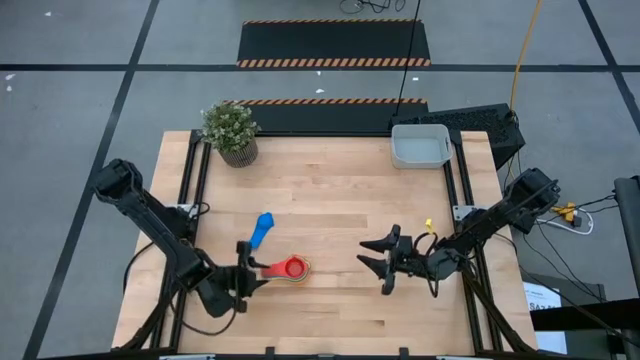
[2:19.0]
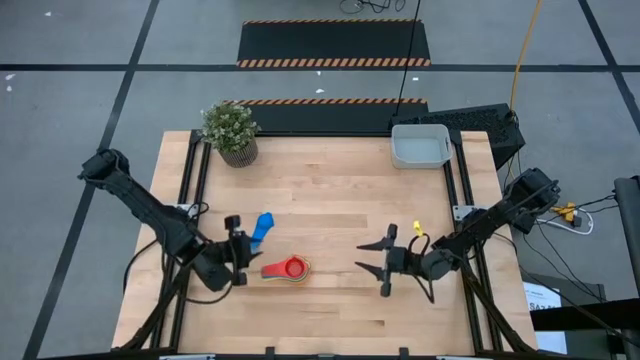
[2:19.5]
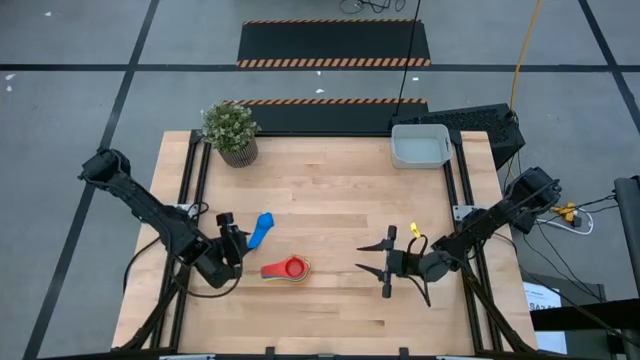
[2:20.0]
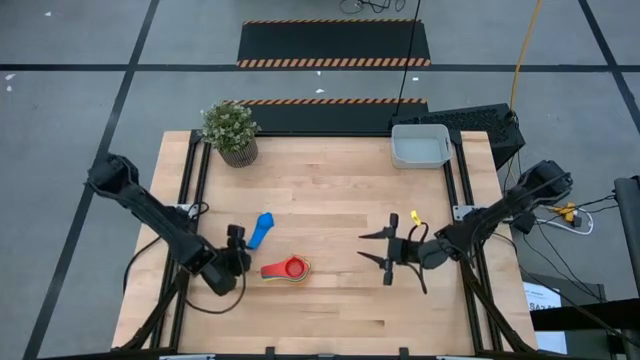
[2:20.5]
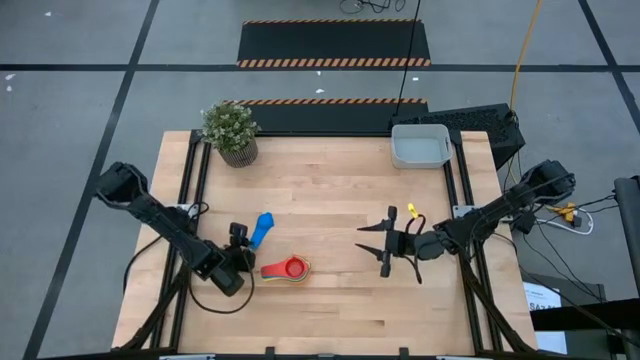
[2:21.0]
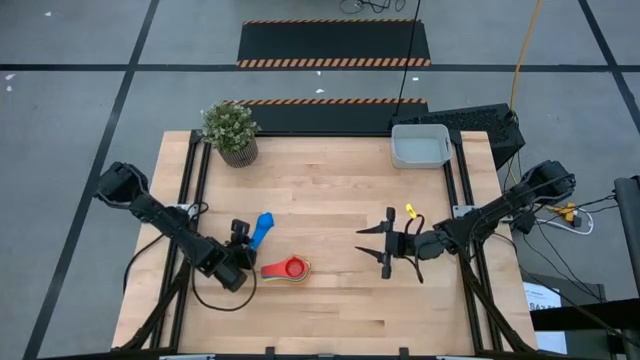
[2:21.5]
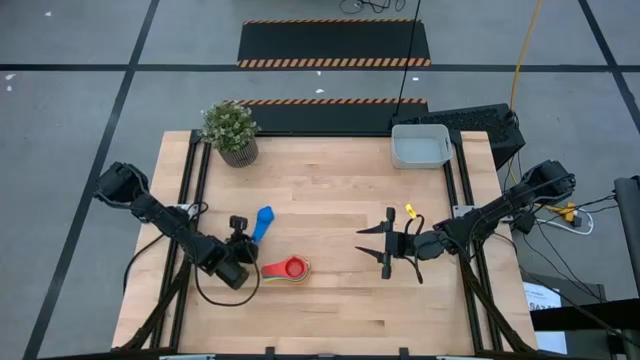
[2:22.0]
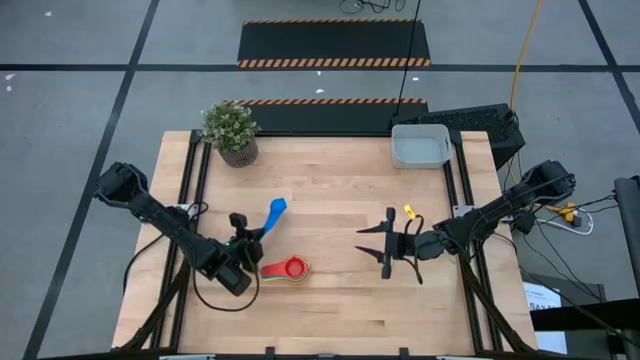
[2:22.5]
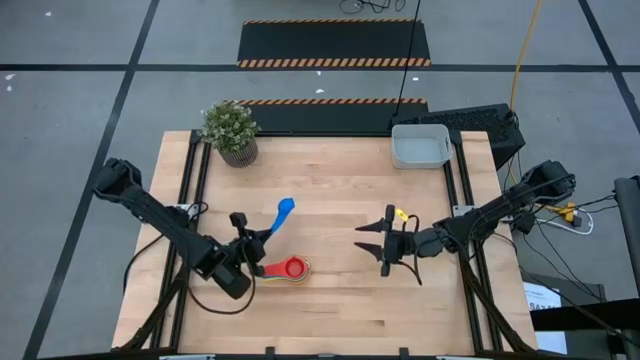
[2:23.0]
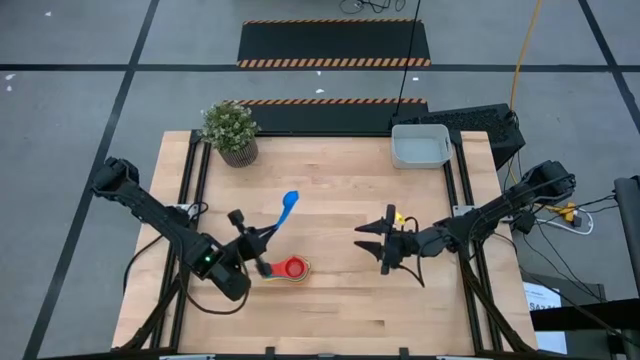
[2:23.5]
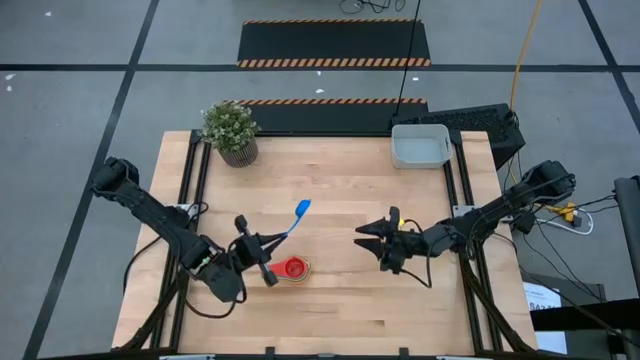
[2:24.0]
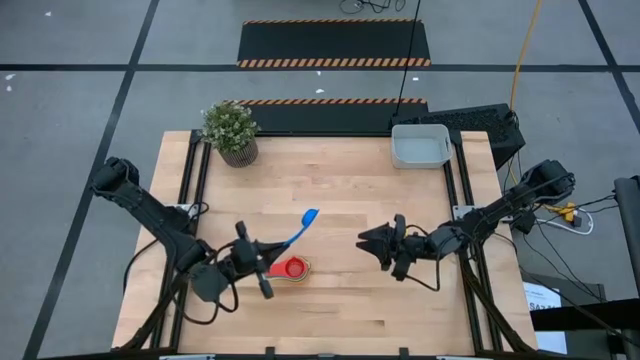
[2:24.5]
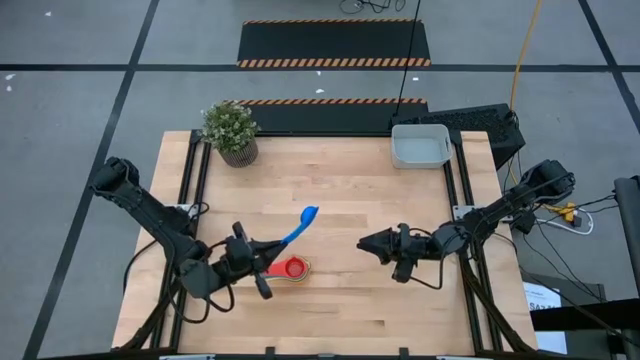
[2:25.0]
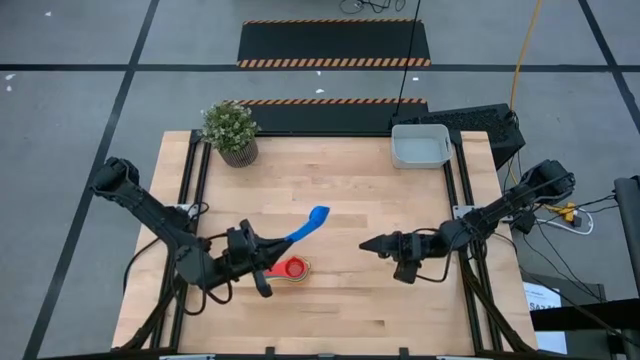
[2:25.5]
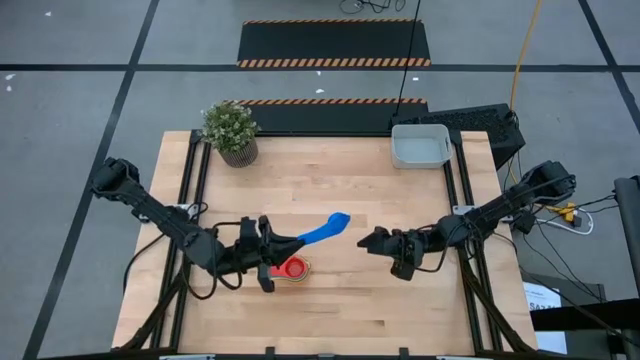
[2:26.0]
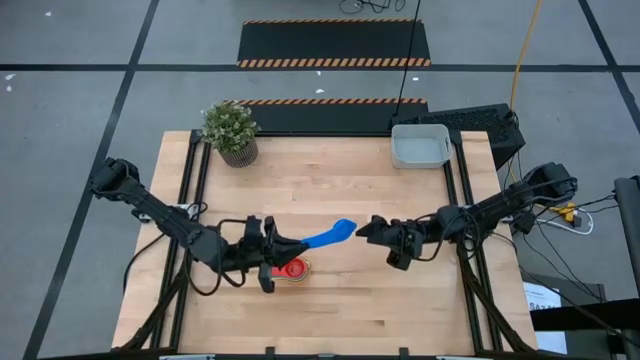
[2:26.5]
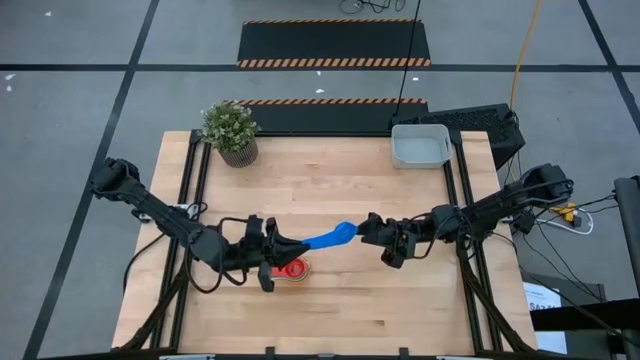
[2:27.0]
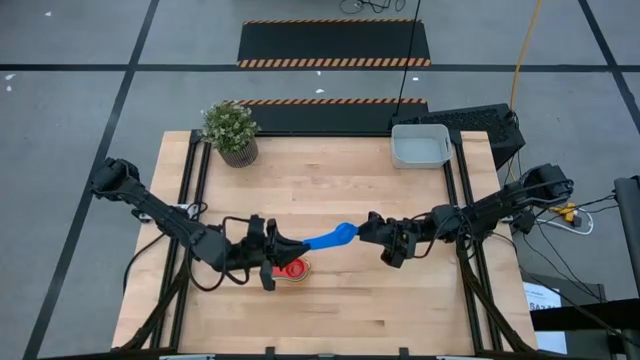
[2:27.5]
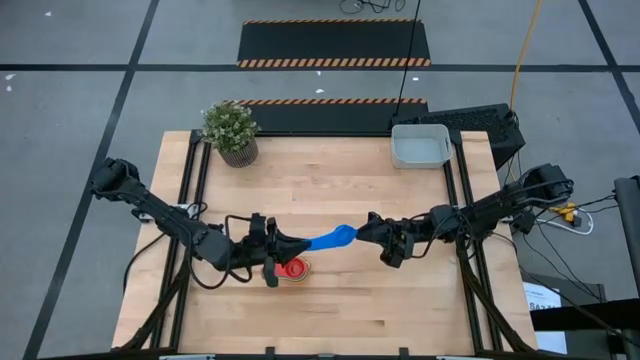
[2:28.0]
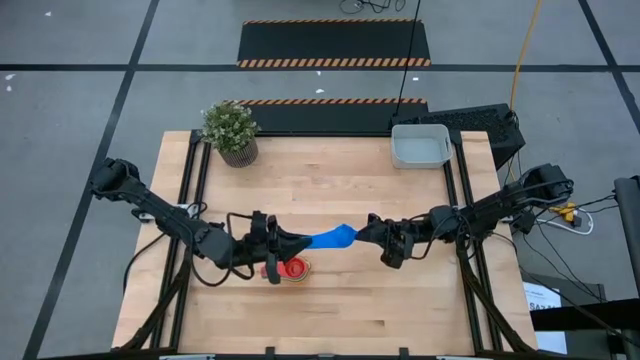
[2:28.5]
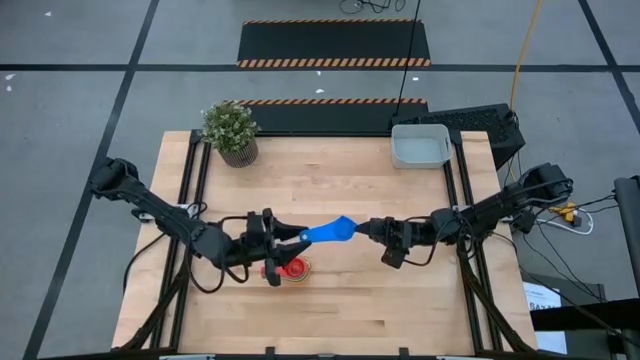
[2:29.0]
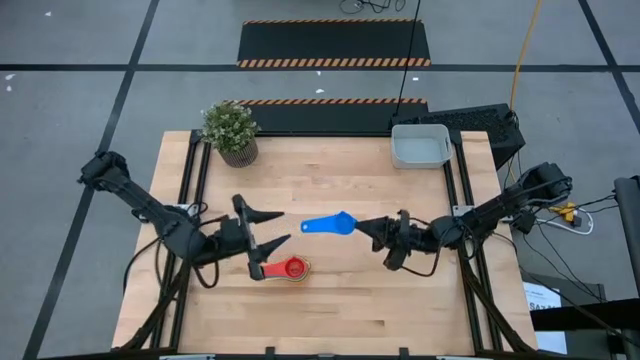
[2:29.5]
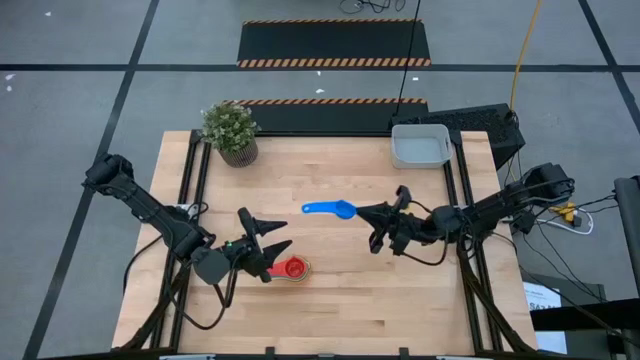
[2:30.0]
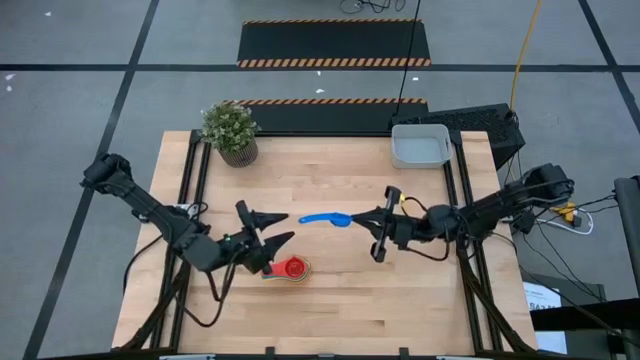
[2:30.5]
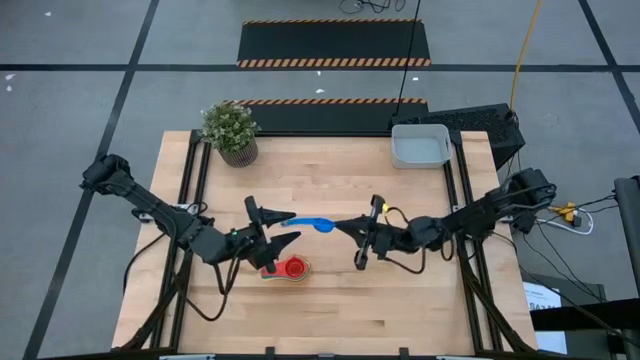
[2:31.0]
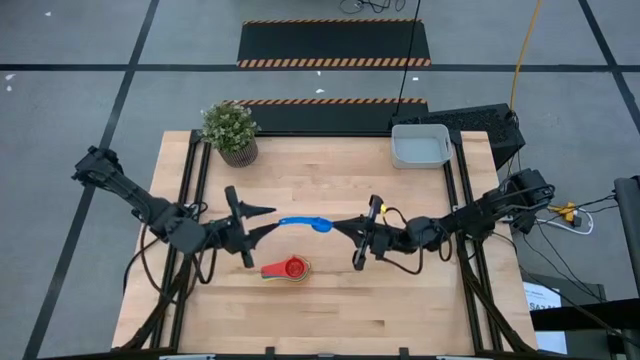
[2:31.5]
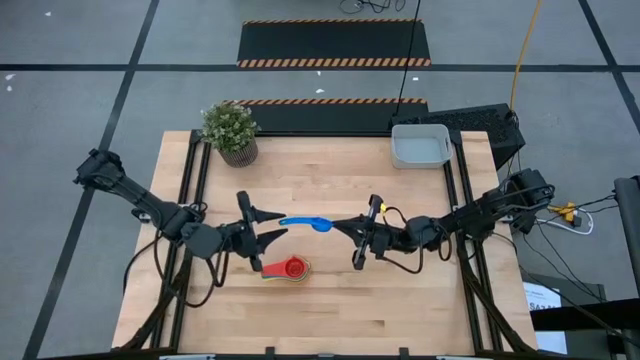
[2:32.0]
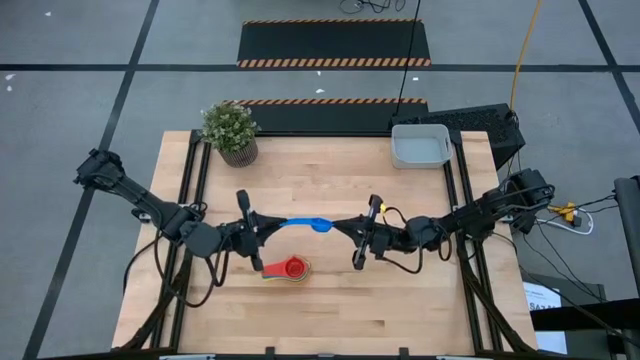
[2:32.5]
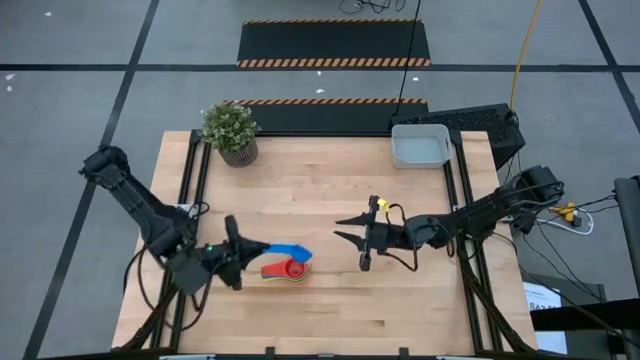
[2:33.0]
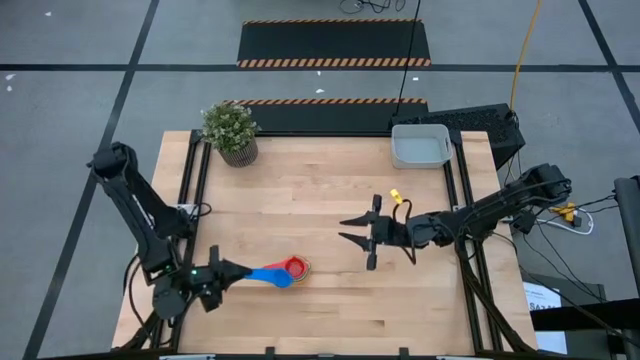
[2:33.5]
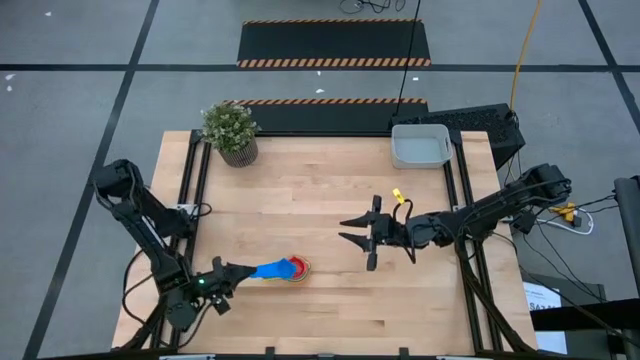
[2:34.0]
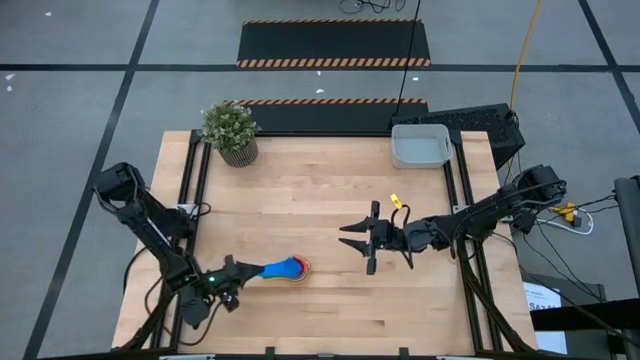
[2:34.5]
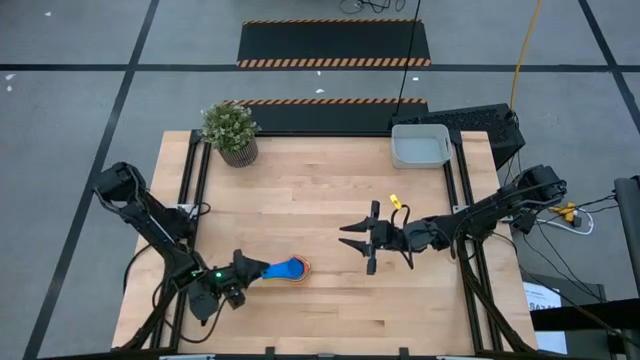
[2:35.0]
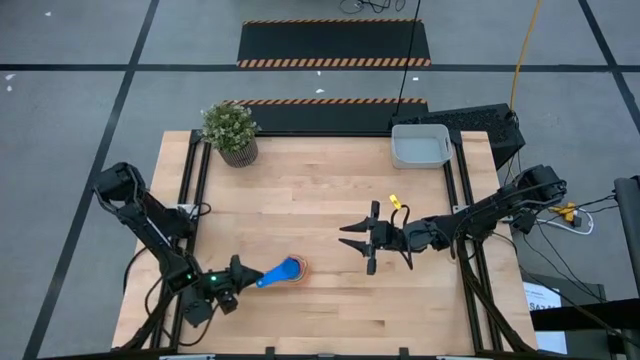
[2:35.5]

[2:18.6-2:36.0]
Task: Nest measuring cups in basket
Stack the light blue measuring cup on the red measuring cup

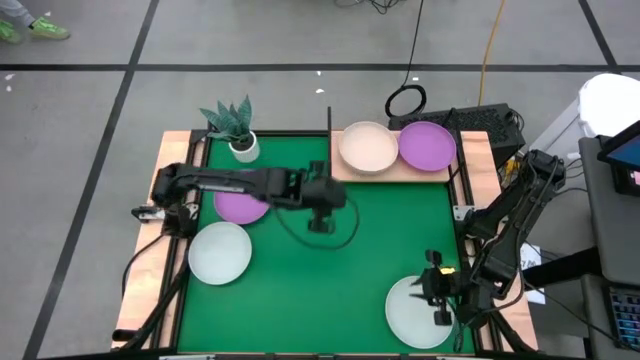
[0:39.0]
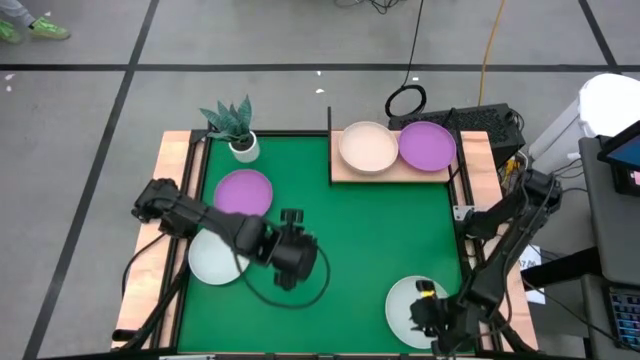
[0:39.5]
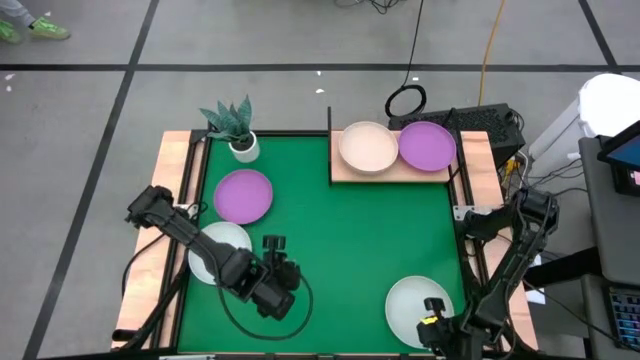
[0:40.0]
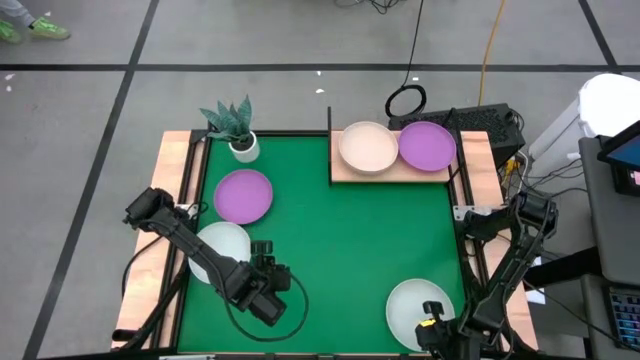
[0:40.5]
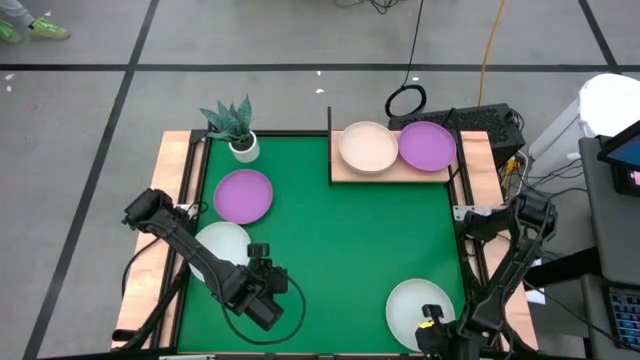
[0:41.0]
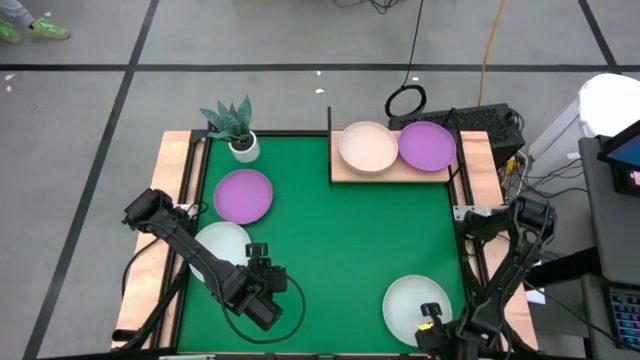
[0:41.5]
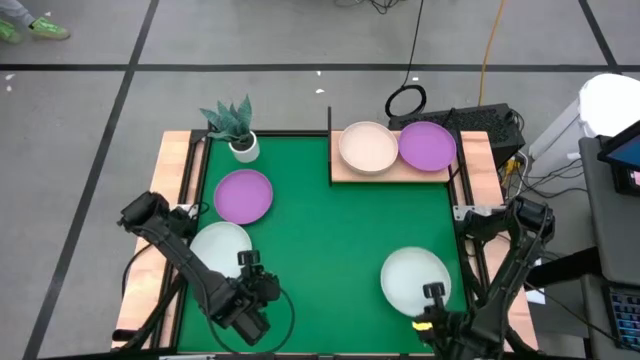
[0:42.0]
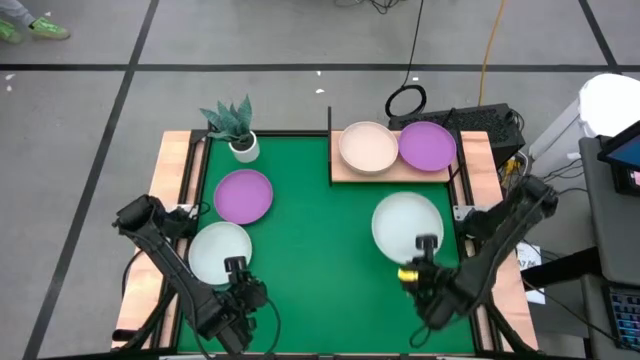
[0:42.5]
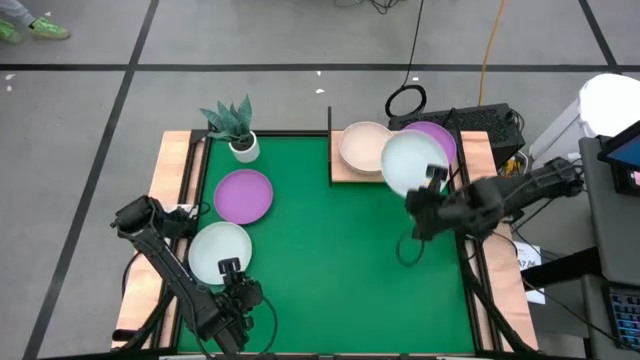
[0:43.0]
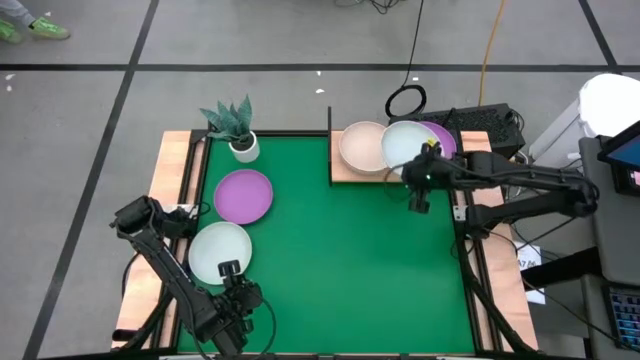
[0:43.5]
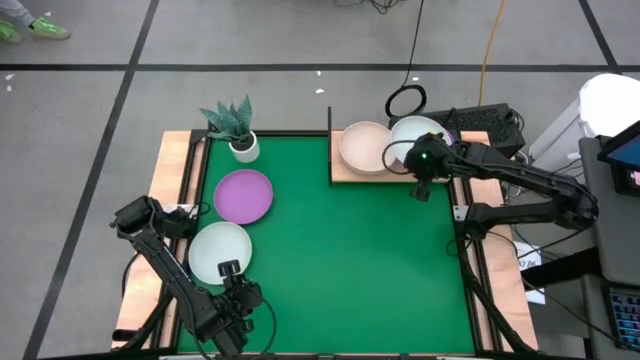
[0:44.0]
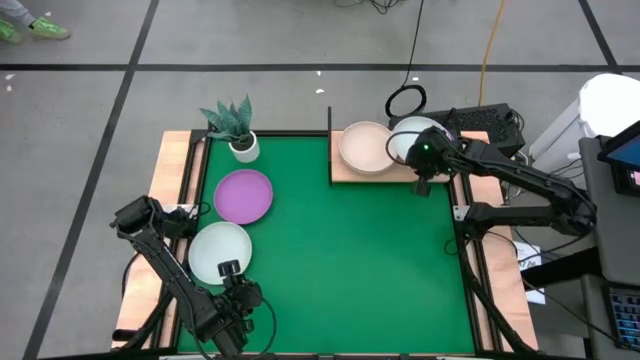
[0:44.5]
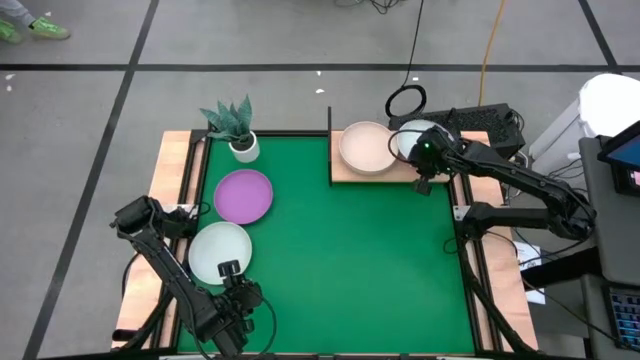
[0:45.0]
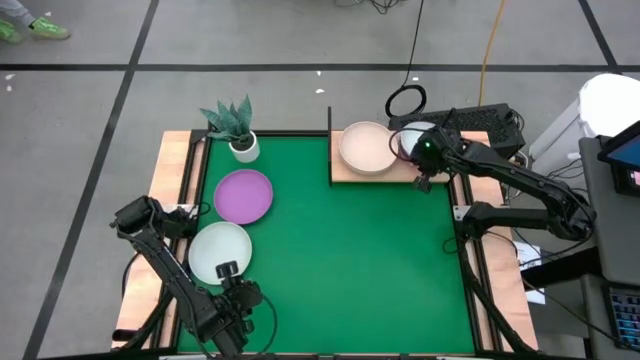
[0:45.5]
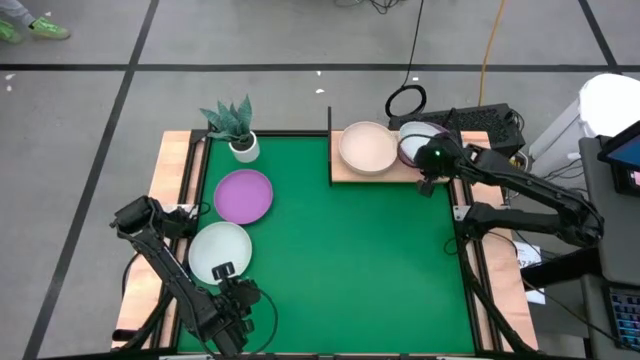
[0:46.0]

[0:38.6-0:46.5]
Task: Place and stack plates onto a shelf
Stack the right light blue plate on the purple plate on the shelf
